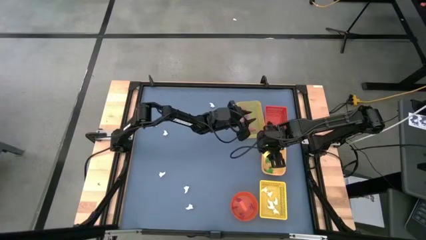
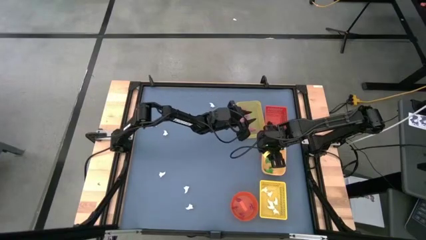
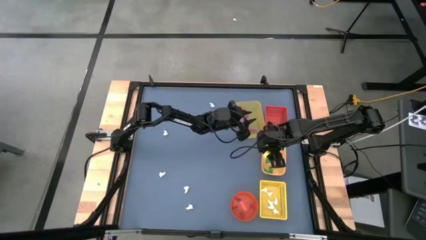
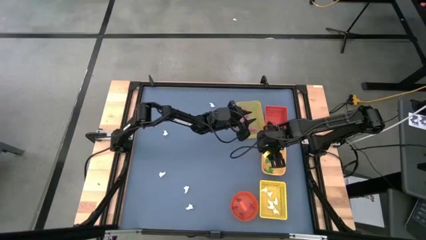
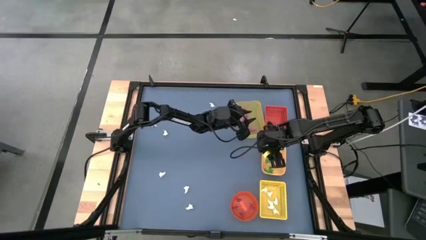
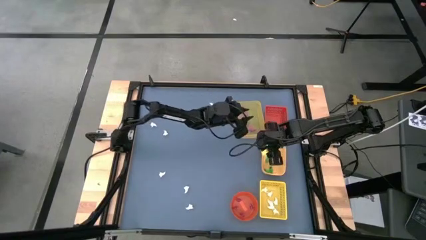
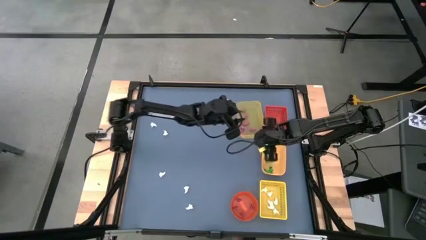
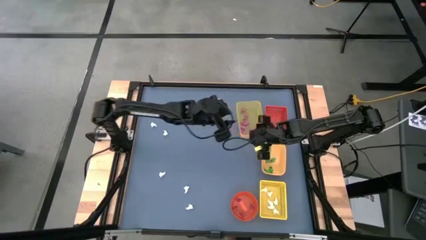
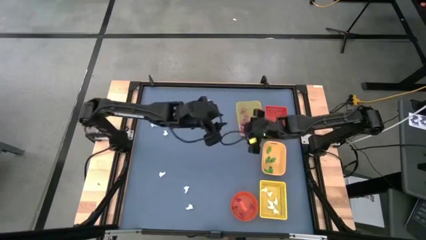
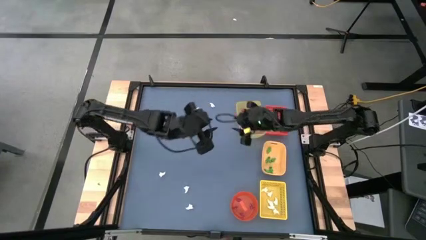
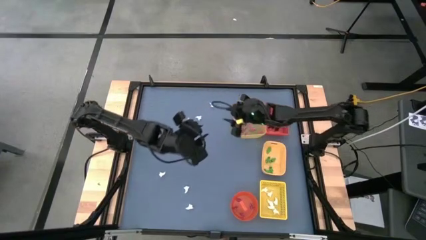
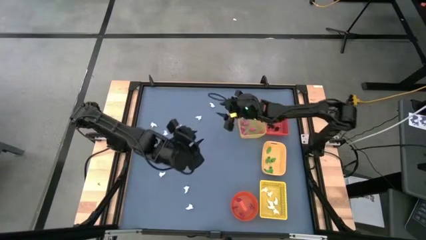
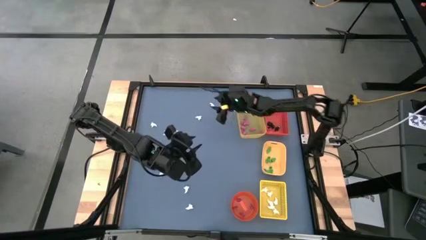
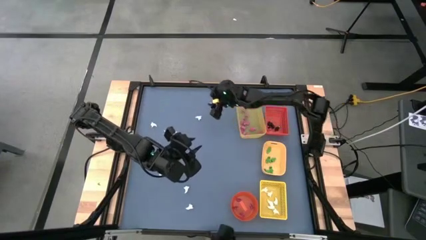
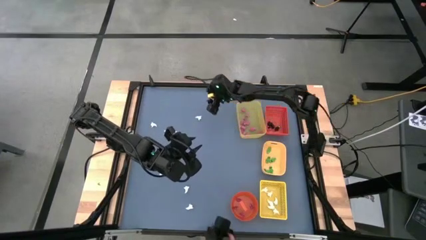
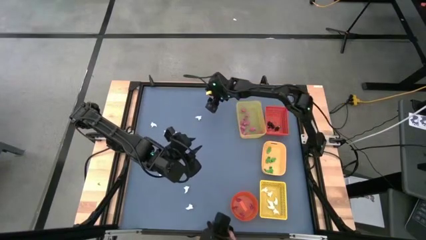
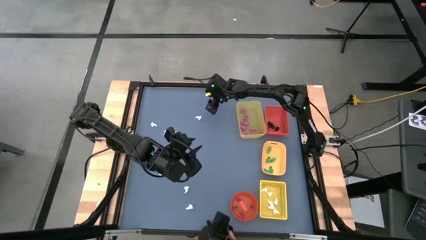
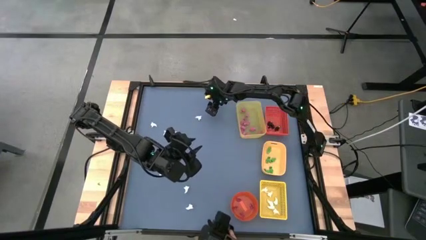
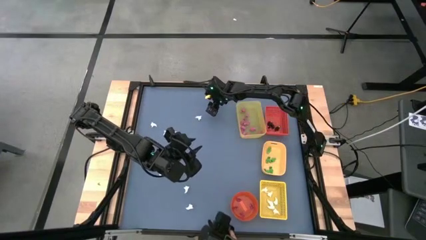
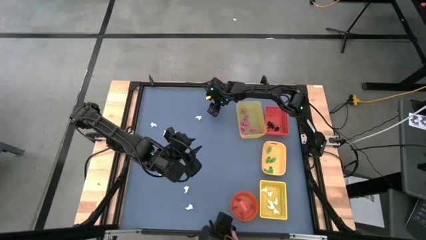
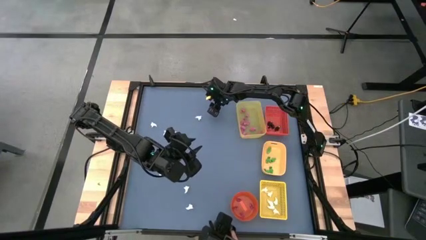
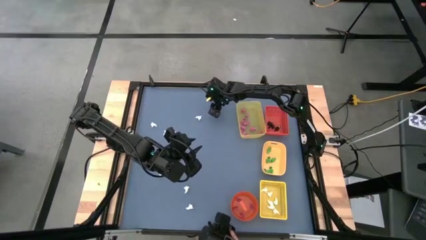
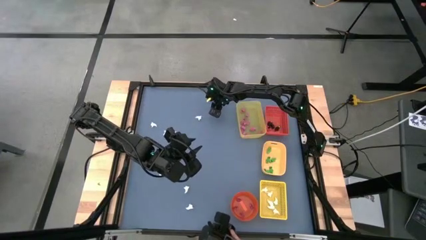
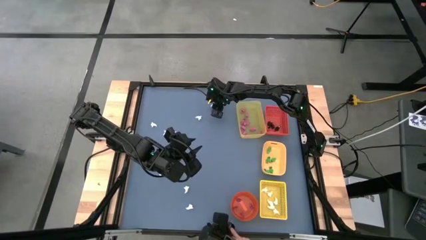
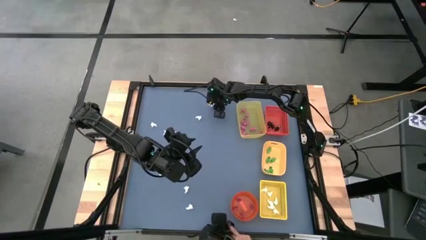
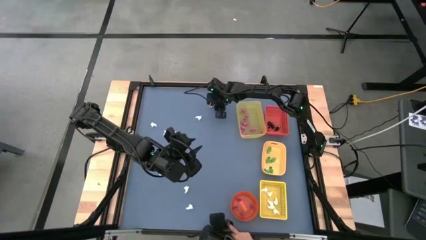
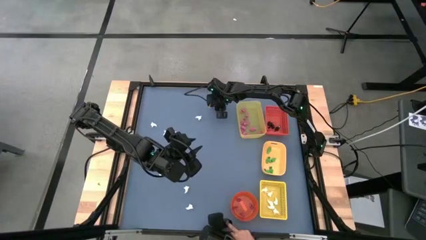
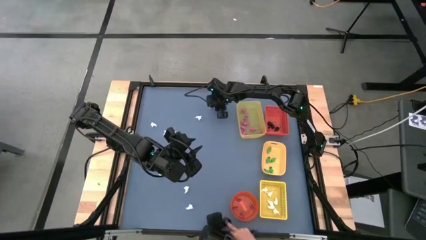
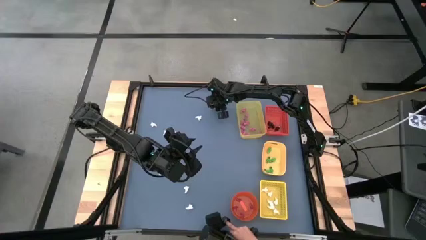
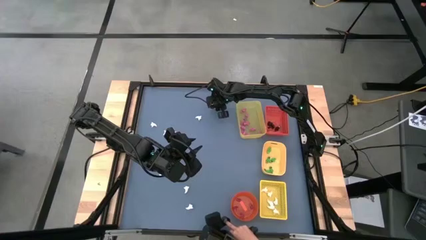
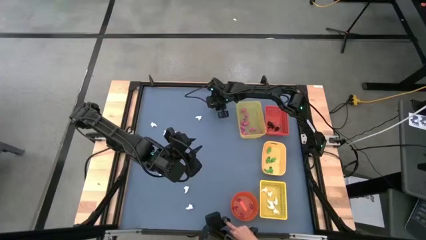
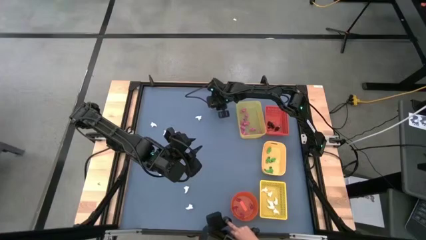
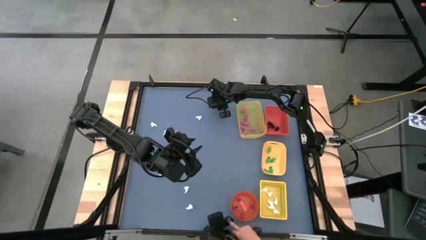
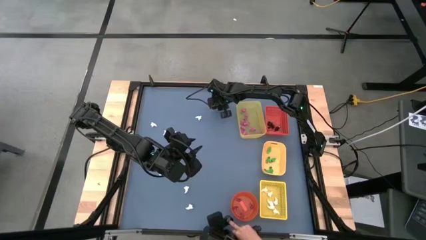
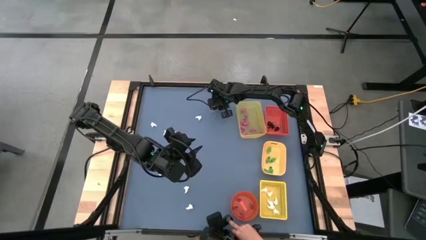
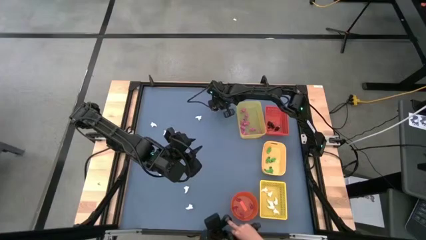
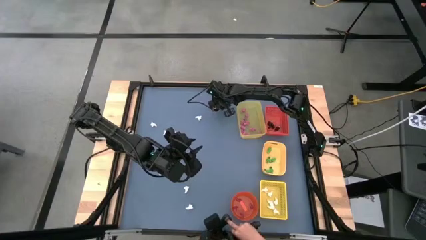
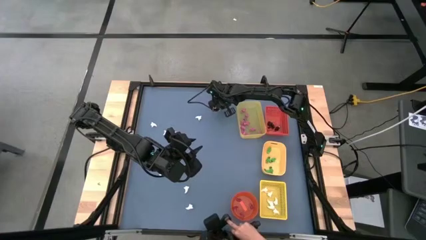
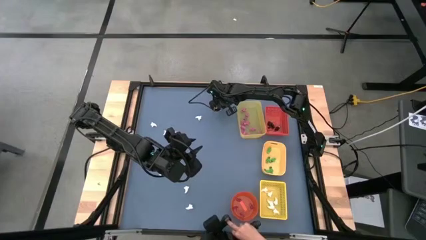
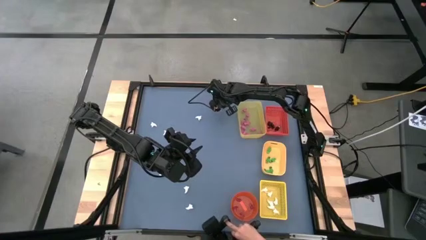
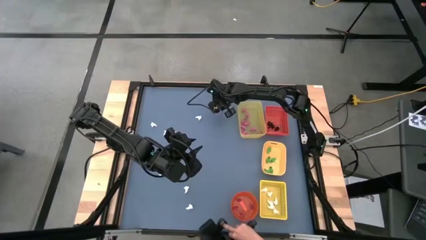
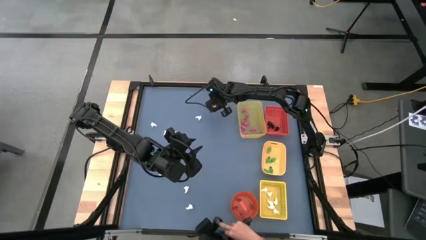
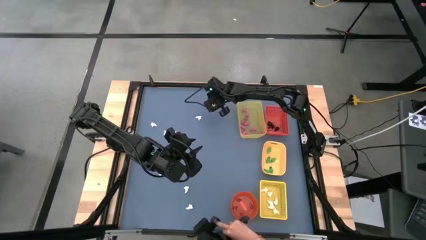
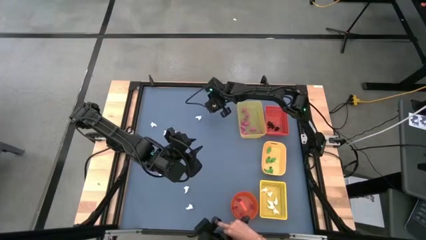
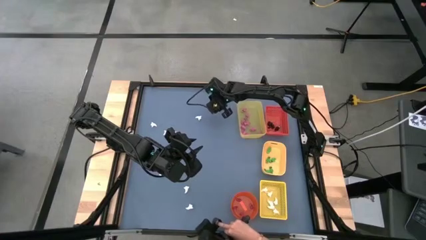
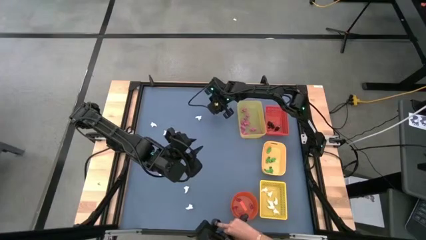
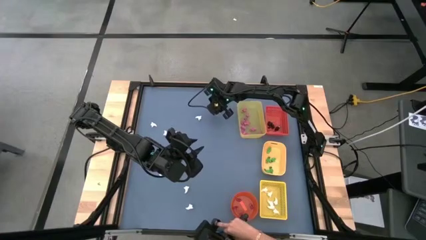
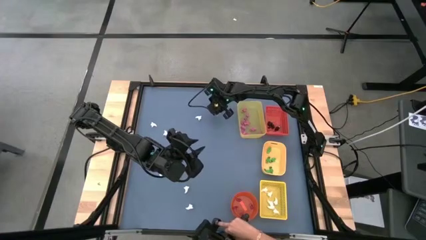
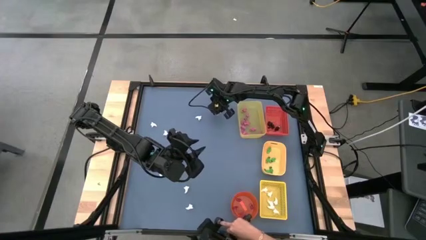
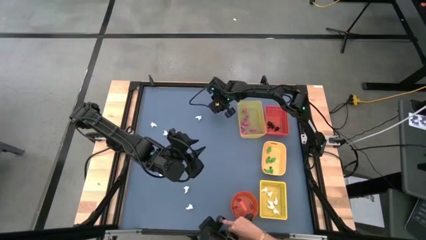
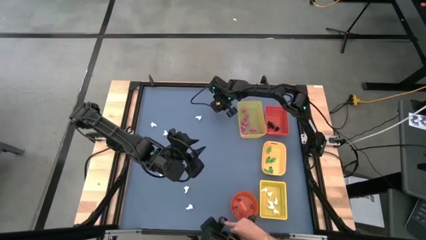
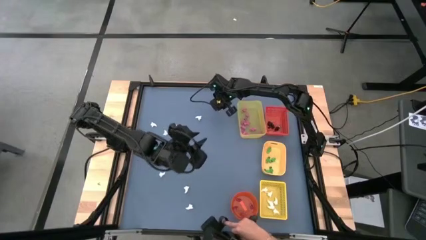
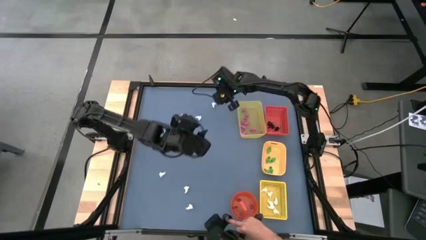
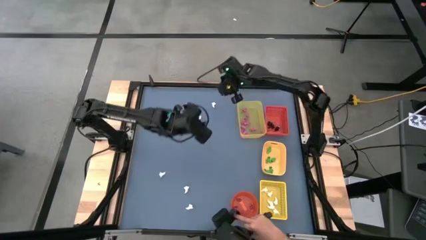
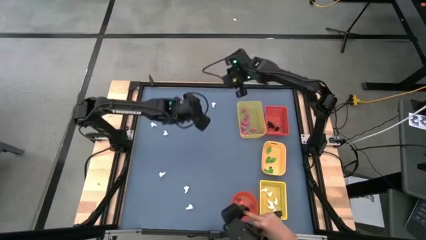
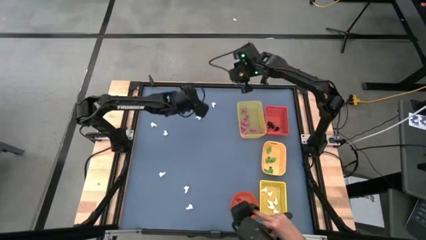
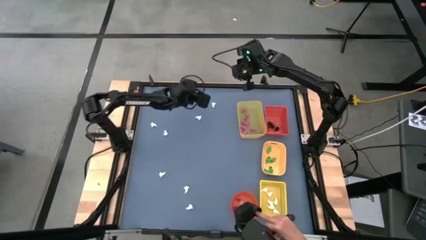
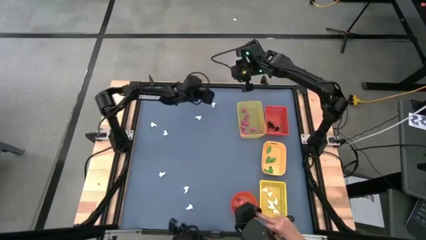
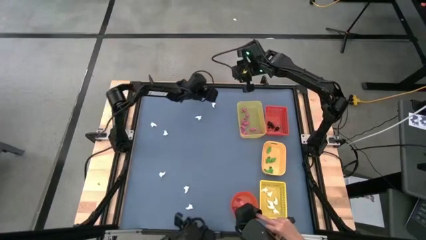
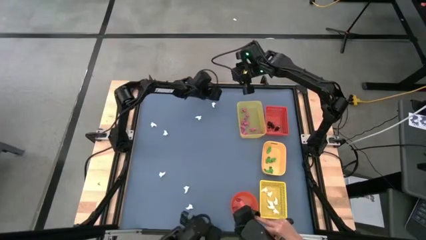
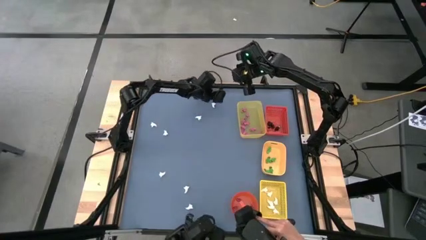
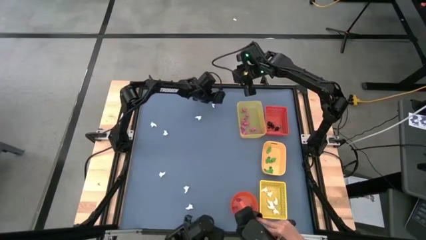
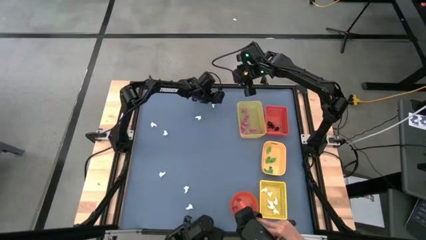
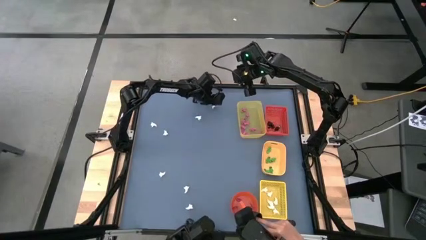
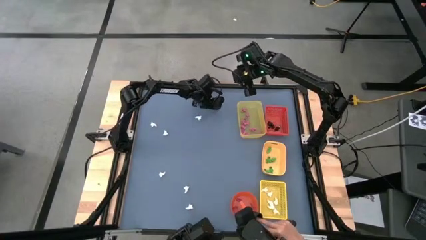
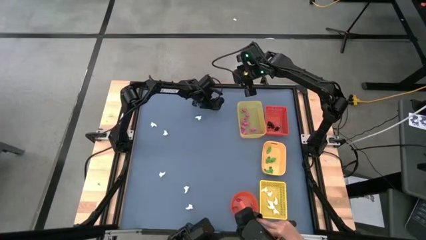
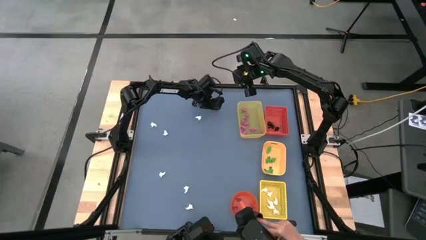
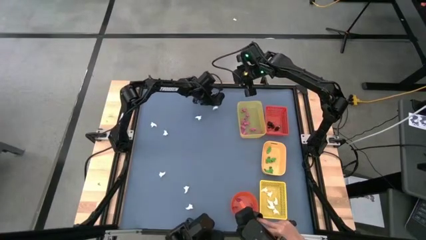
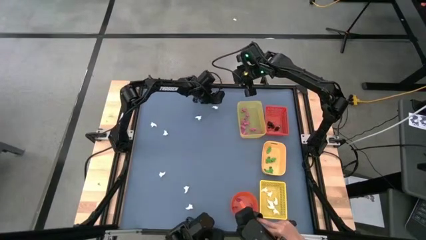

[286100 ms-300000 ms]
Task: Sort Halloween decoration
Put the white ghost toy into the yellow box
